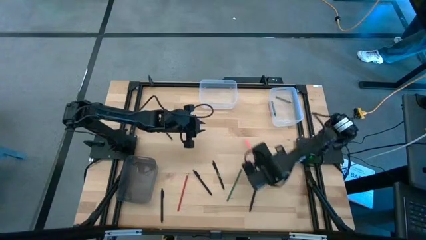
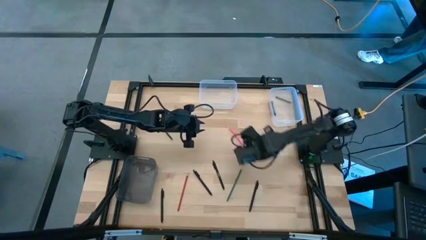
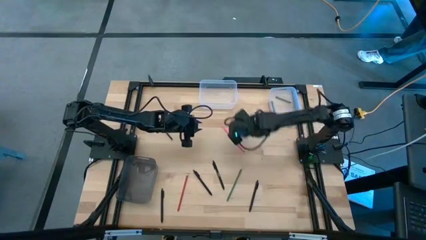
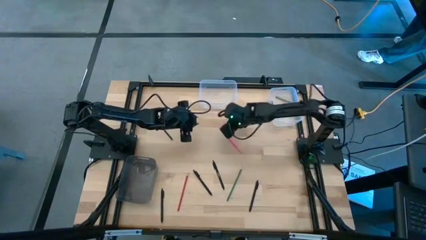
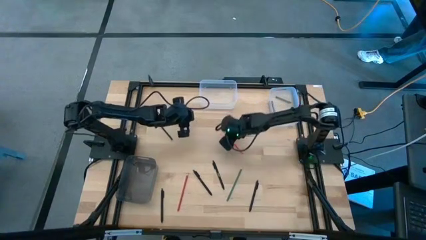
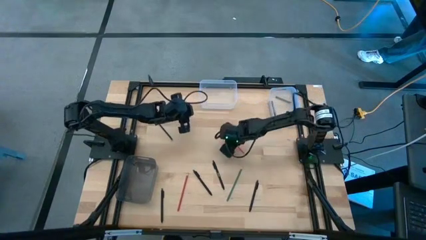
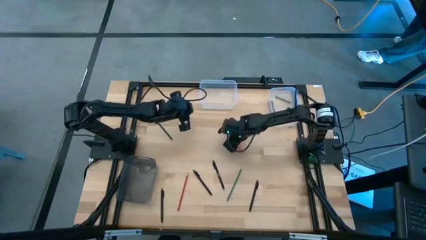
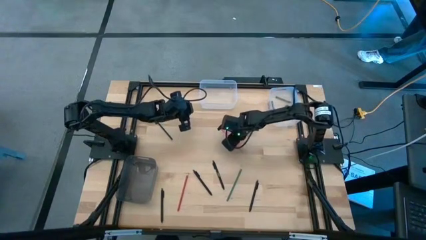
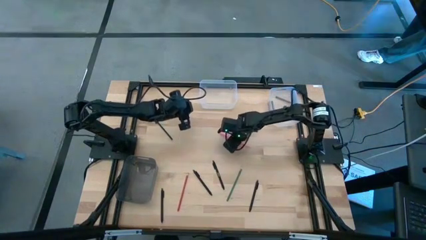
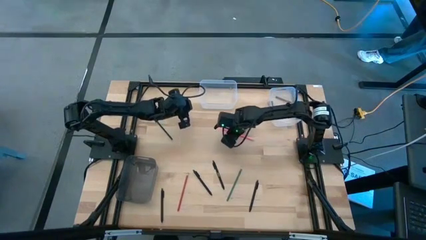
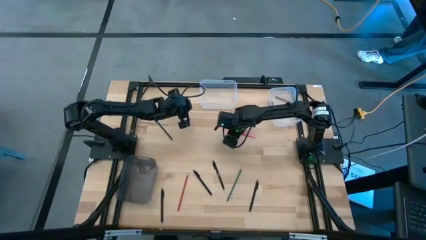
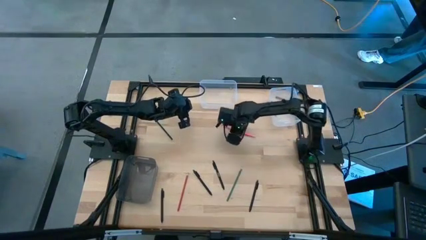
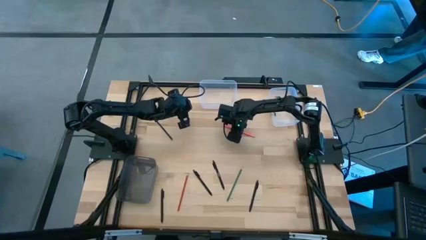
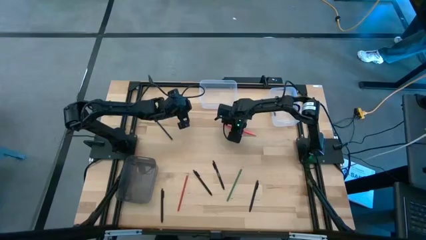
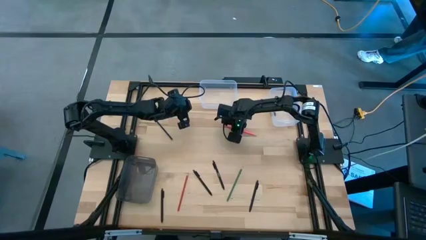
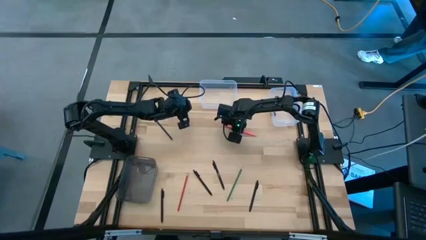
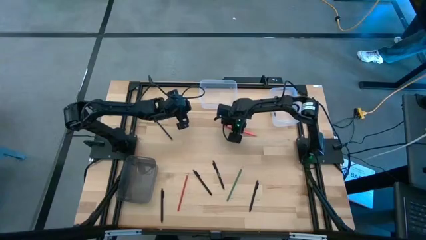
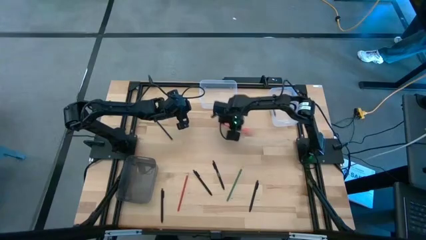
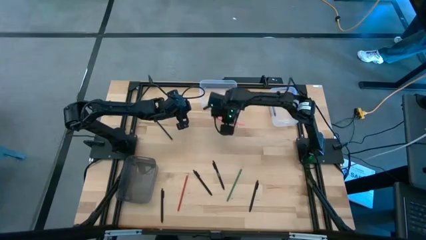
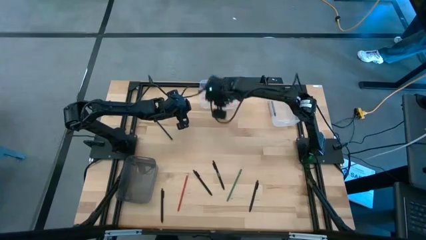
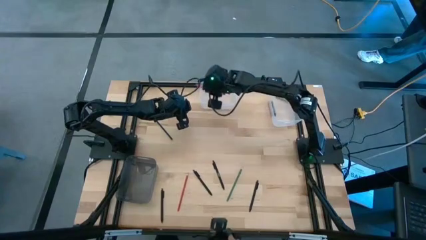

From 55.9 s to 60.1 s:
Task: Sort crayons/erasers/pens/pencils in bins
Put the pink pencil into the left transparent bin

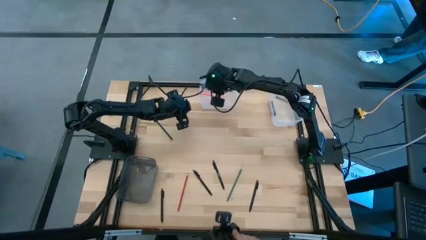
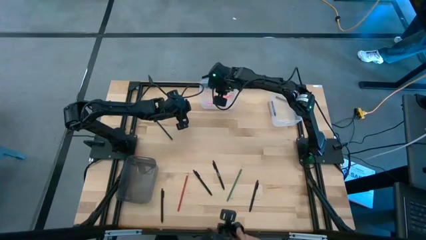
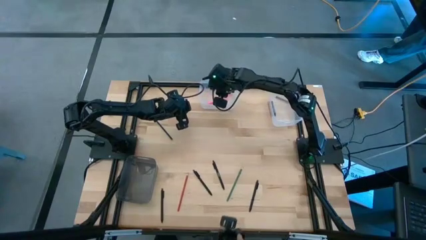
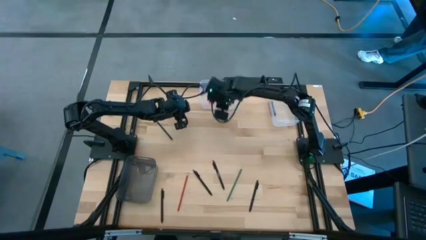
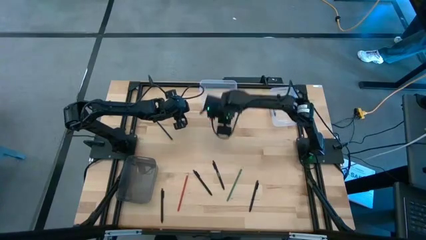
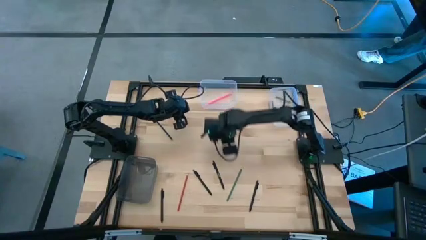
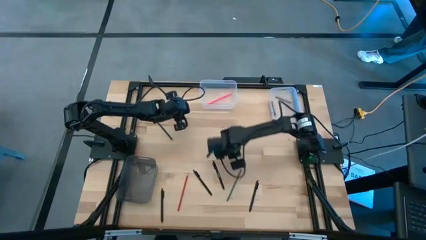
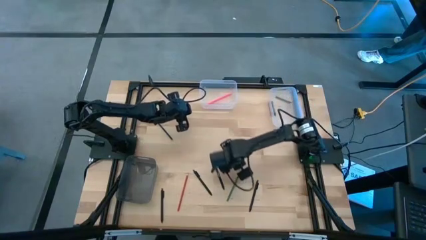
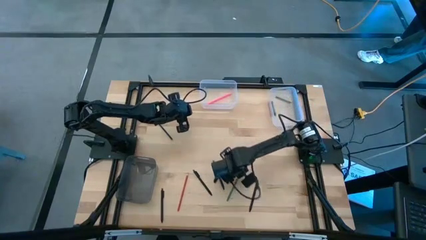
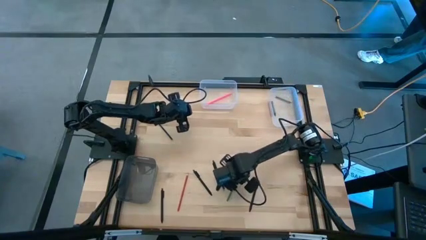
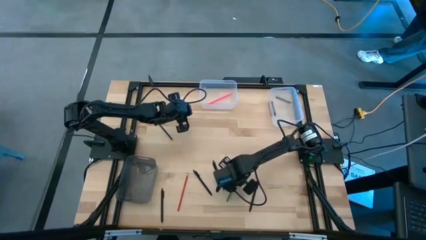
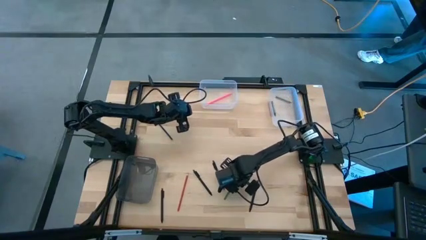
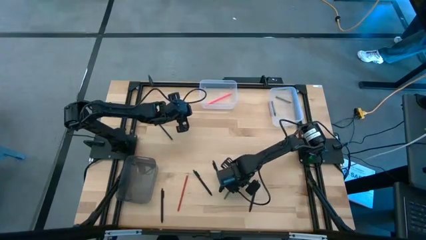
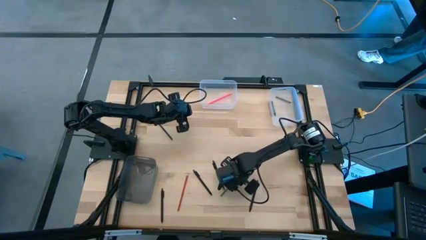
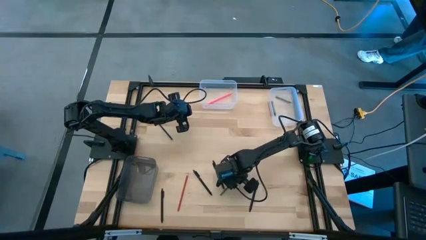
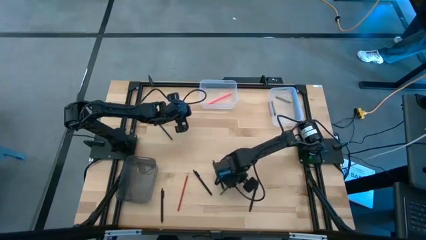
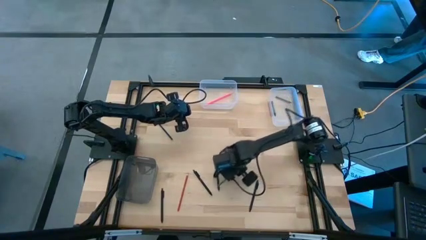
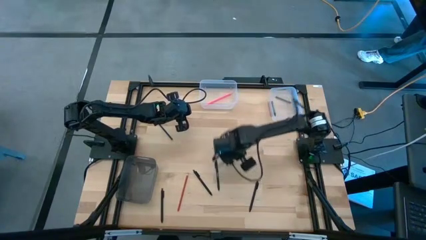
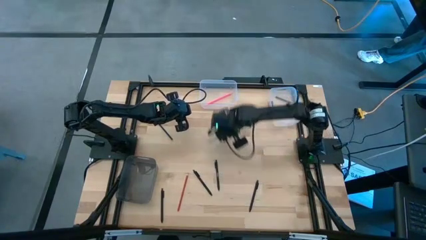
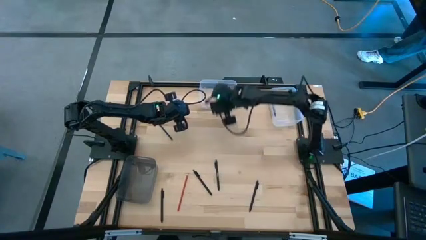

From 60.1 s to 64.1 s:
Put the green pencil into the left transparent bin

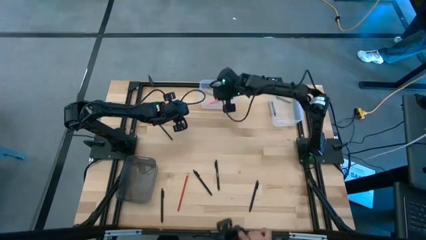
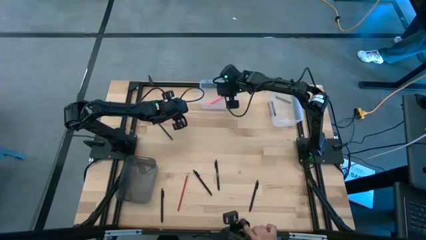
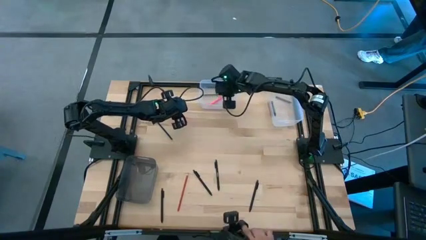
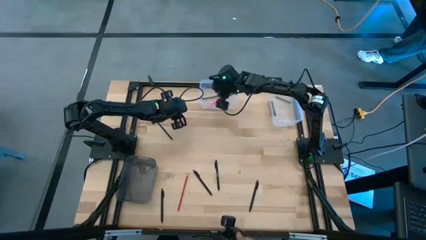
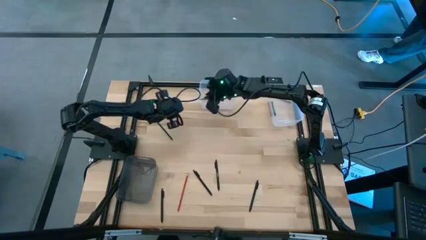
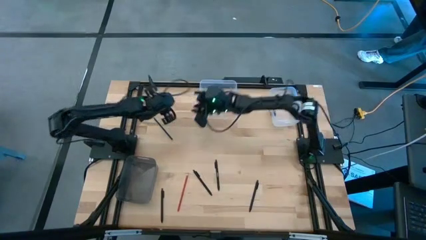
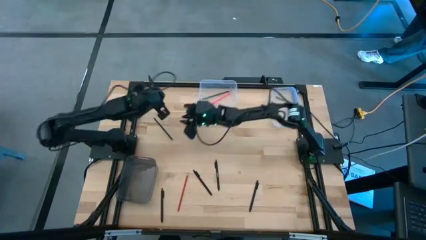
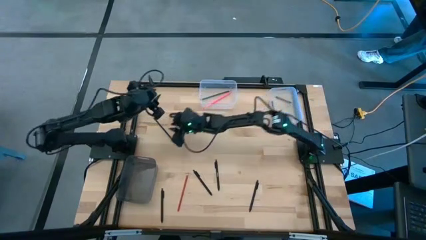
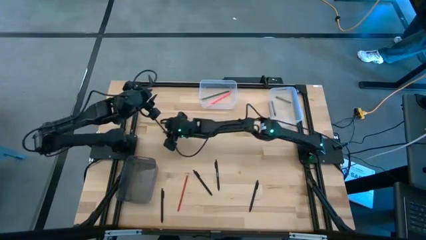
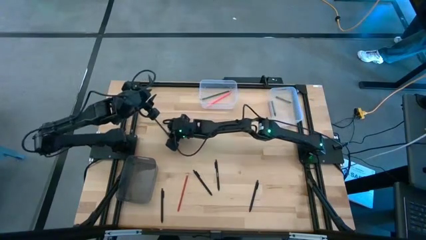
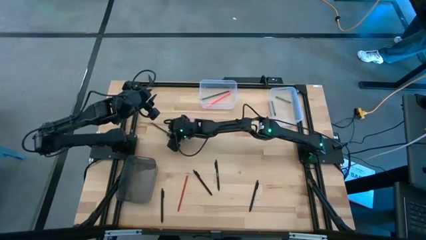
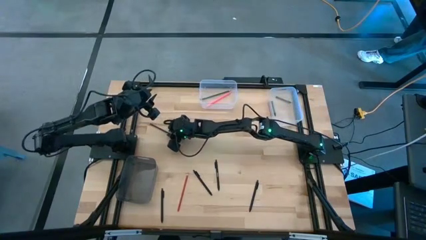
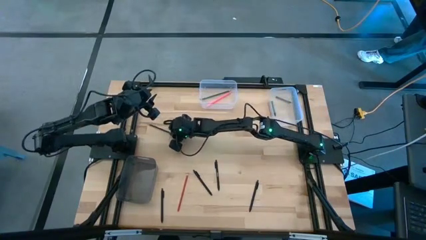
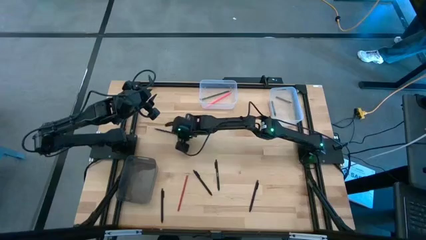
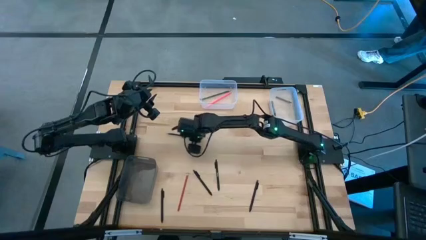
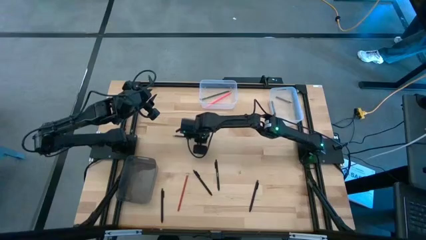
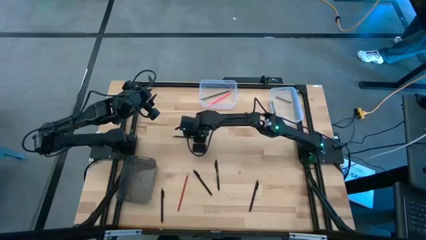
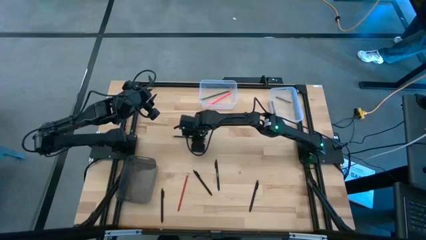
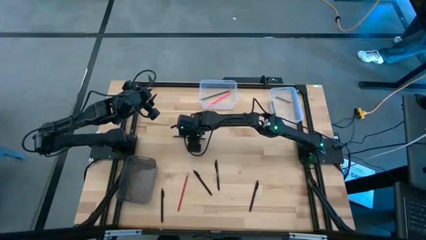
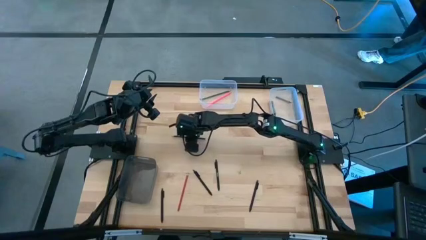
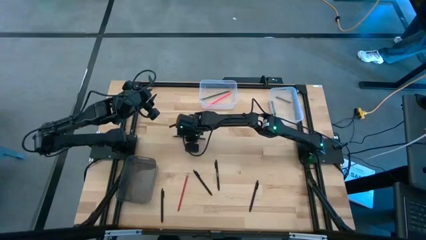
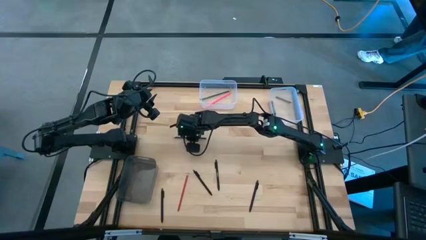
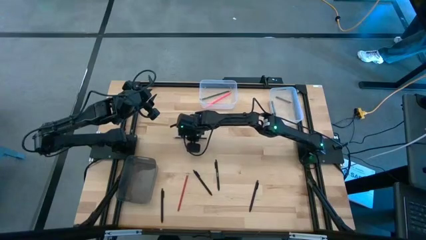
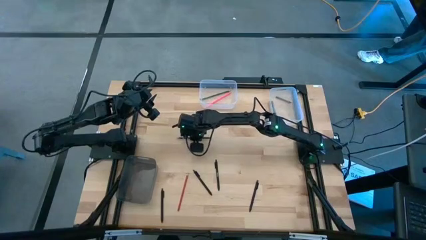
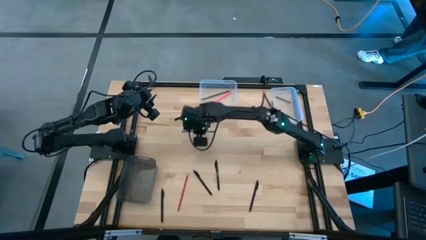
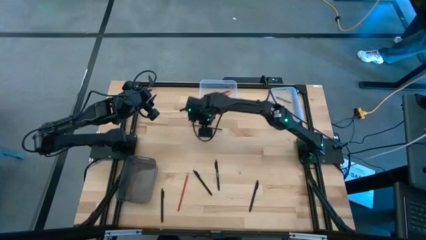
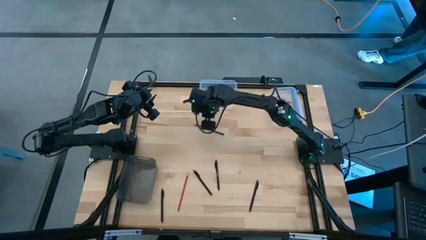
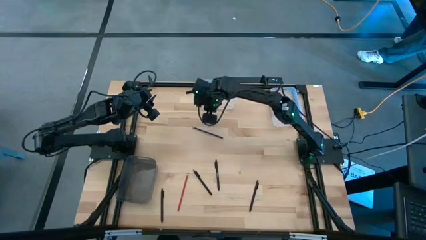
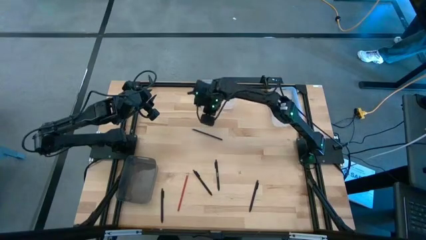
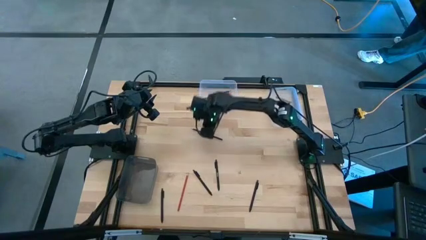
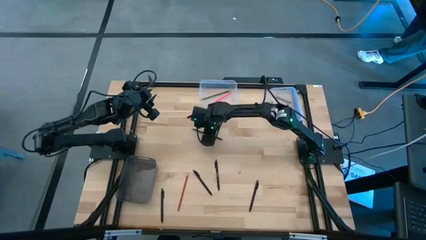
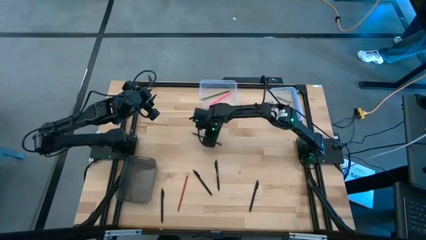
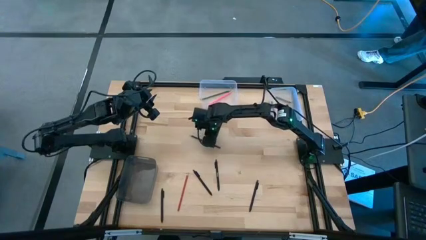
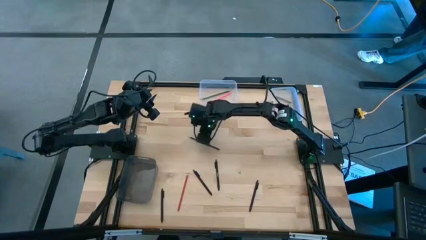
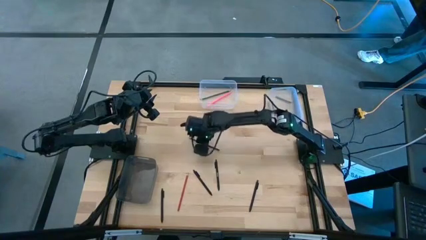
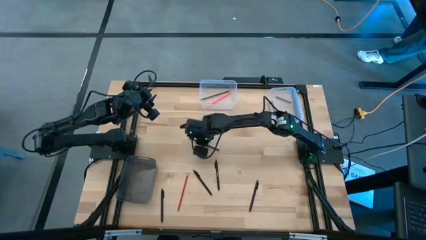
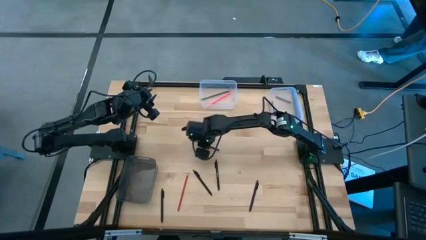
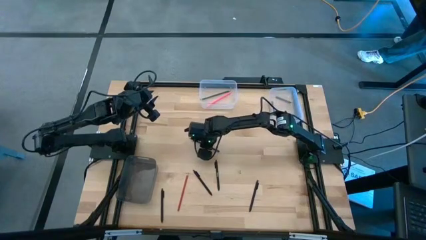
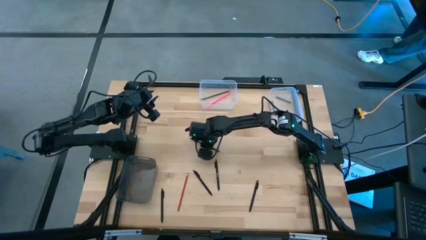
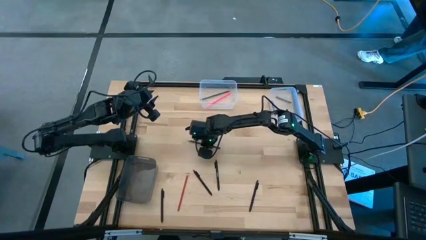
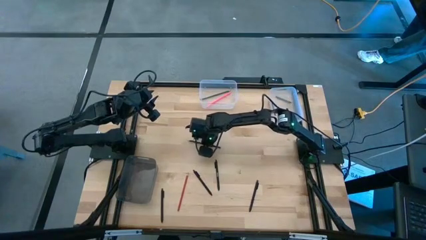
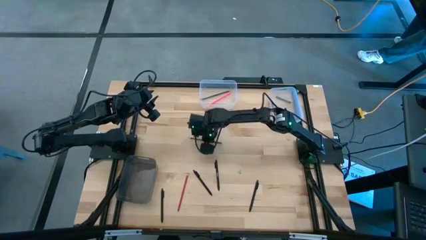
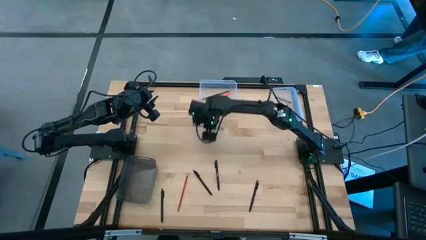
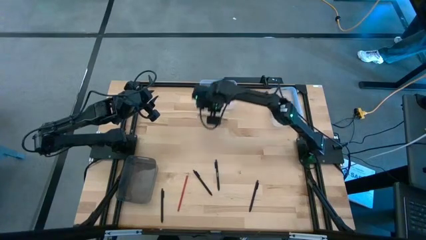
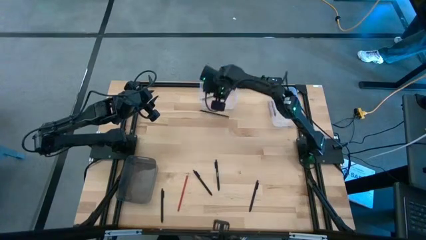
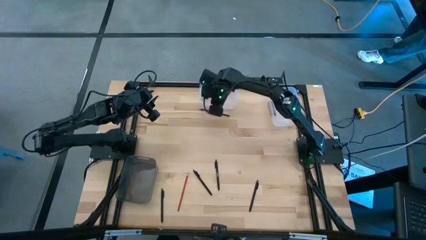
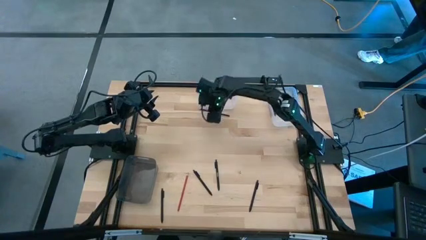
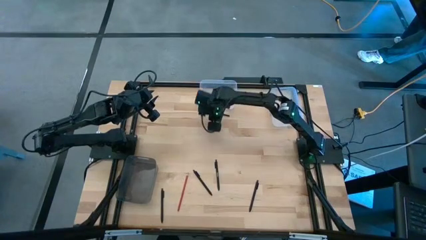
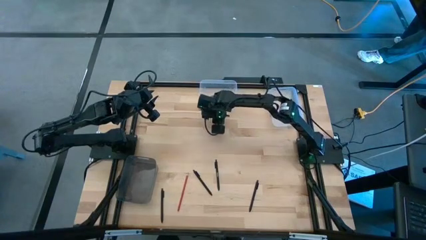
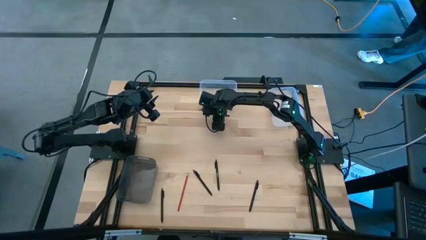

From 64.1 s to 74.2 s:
Put the blue pencil into the left transparent bin
